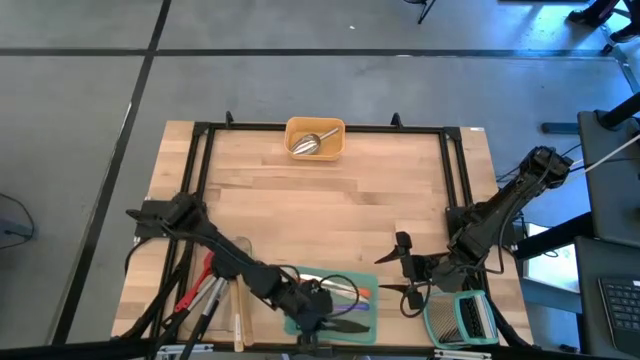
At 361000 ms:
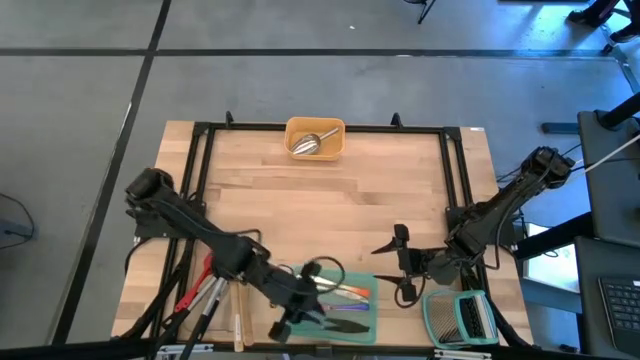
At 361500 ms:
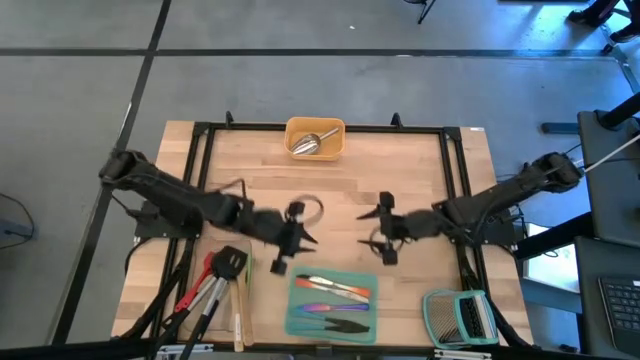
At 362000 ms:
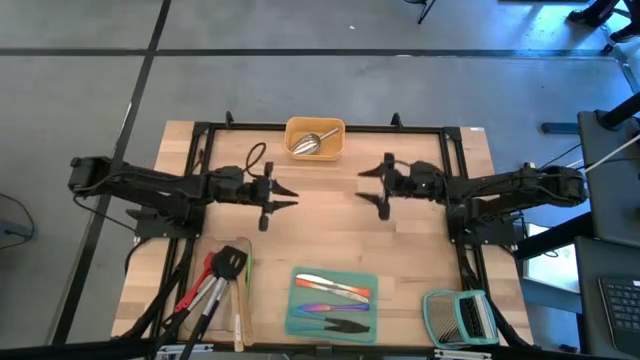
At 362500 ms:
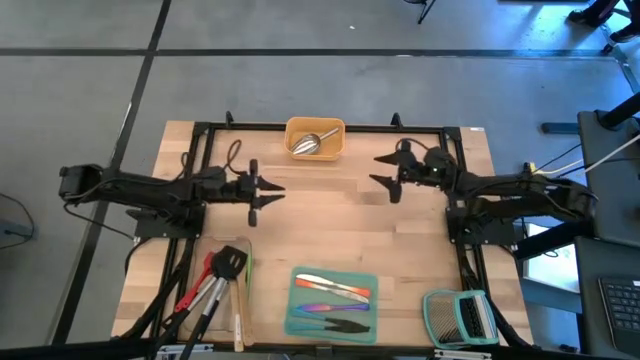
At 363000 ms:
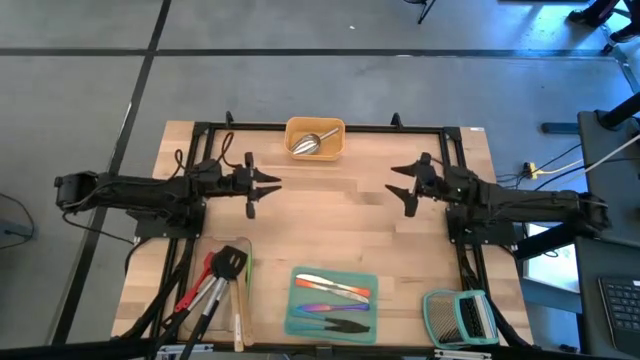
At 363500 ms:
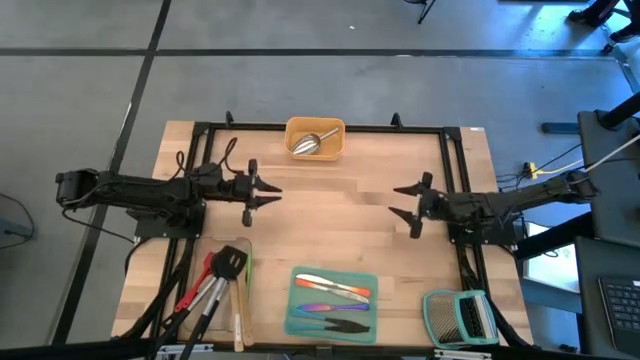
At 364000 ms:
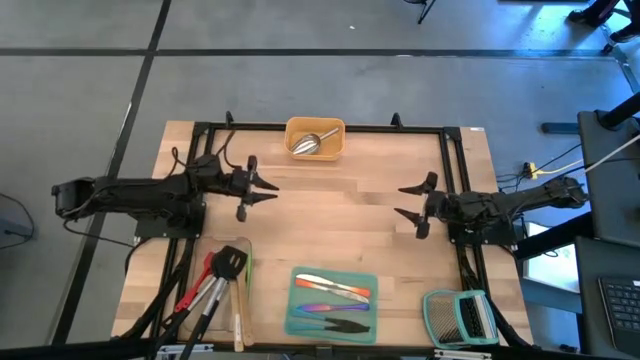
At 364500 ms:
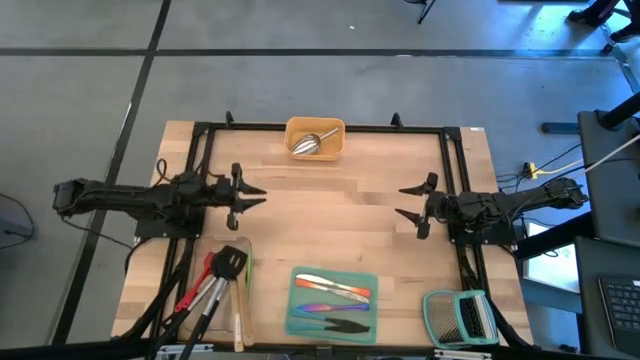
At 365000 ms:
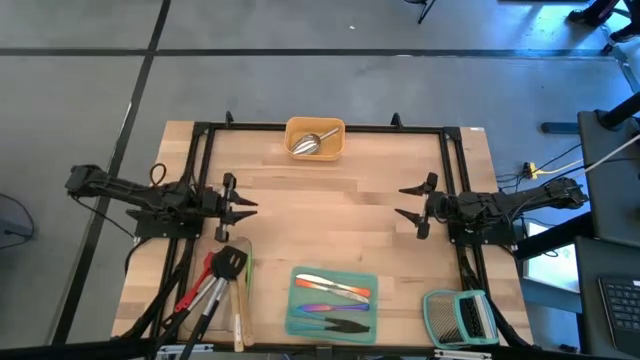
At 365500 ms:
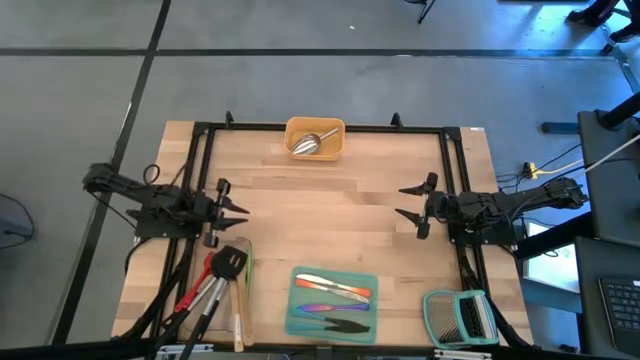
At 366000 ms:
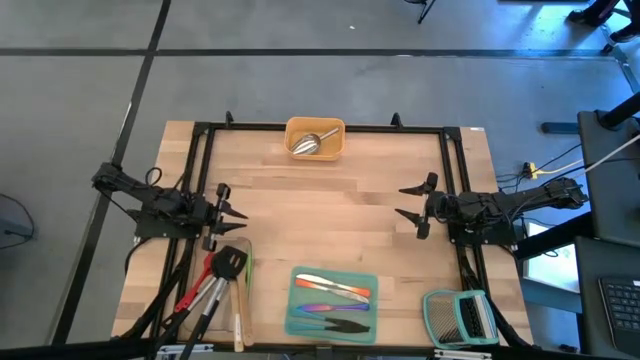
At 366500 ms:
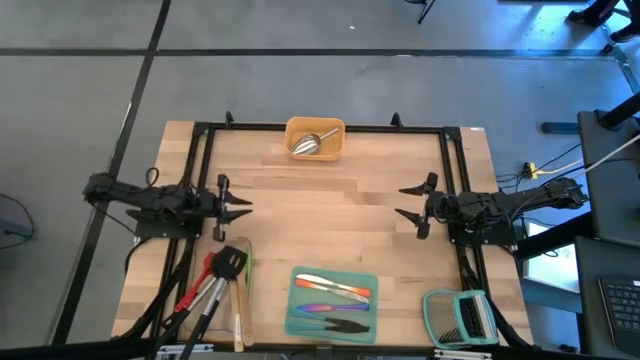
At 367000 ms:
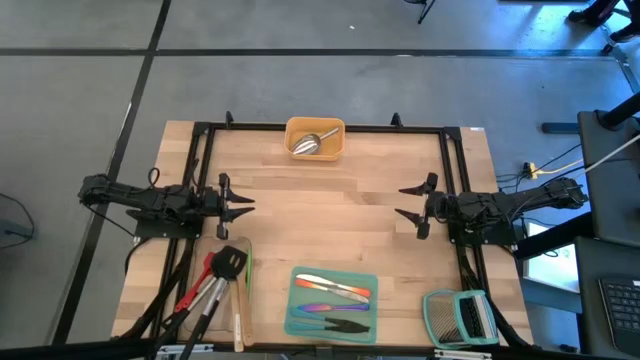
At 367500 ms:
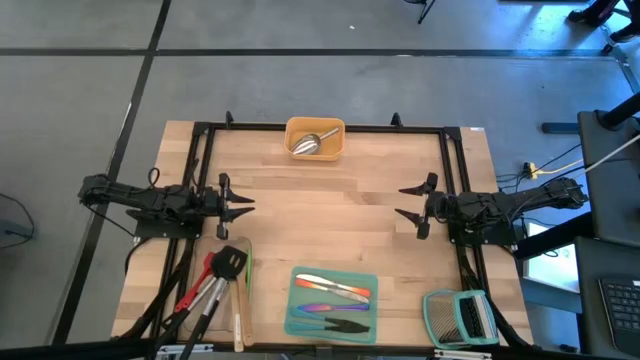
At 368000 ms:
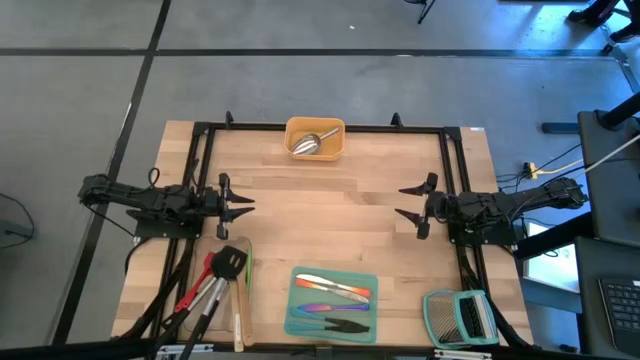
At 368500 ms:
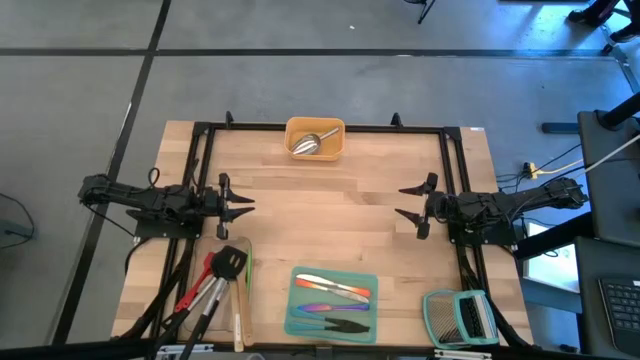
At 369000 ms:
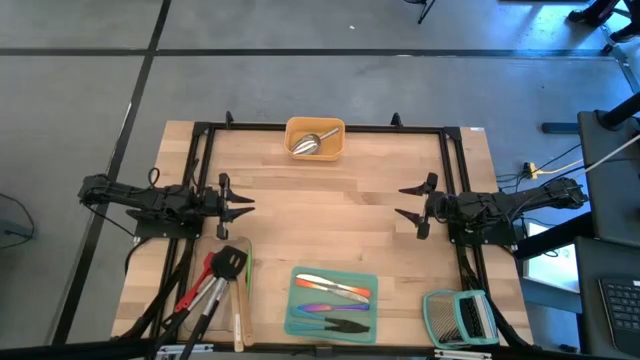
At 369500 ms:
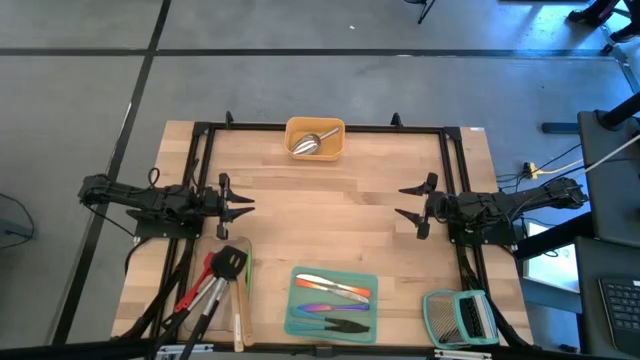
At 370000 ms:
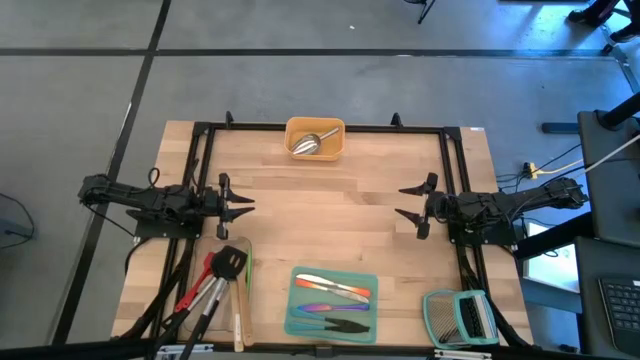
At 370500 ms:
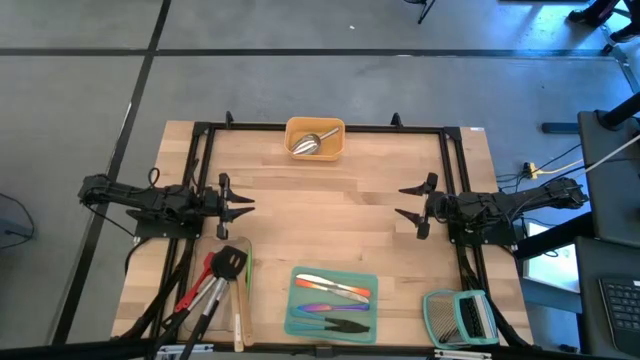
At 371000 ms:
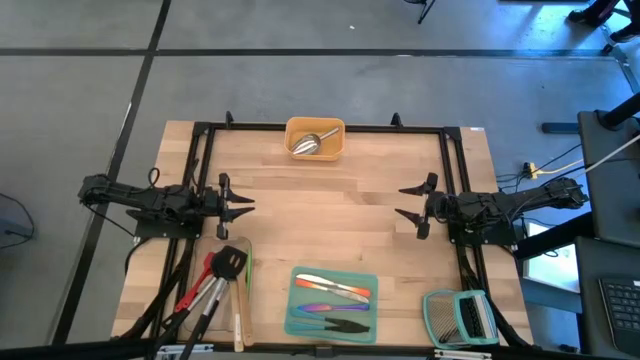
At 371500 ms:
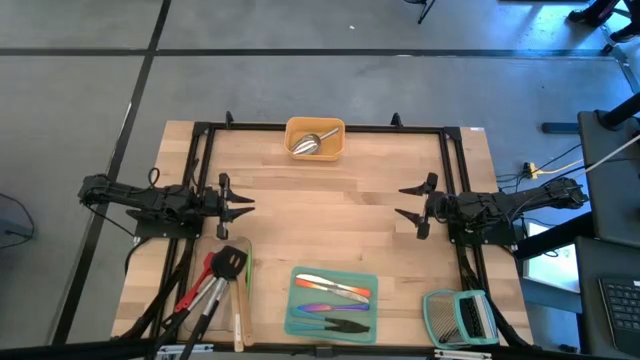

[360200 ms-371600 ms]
Task: Pick & Place Kitchen Items
Return to Home Position

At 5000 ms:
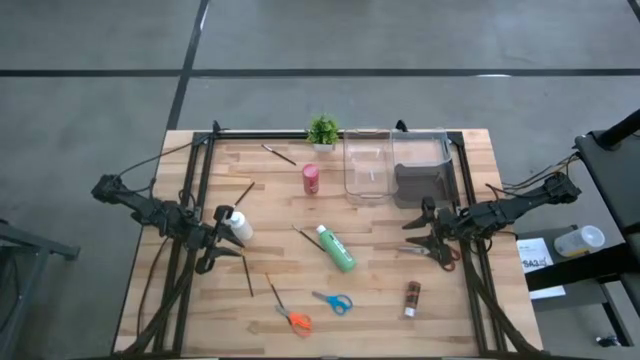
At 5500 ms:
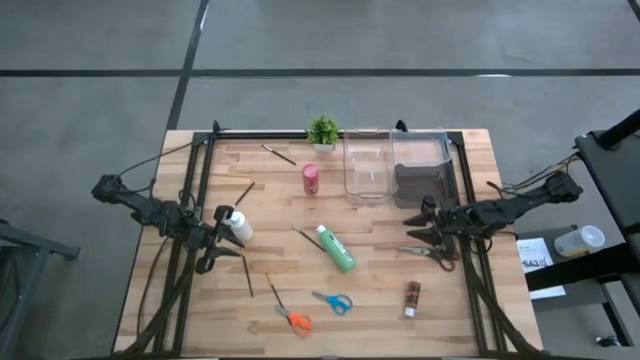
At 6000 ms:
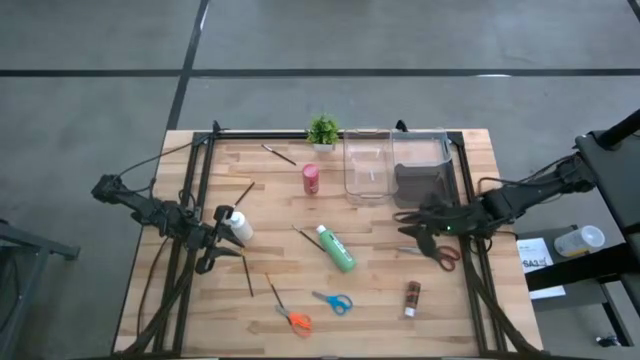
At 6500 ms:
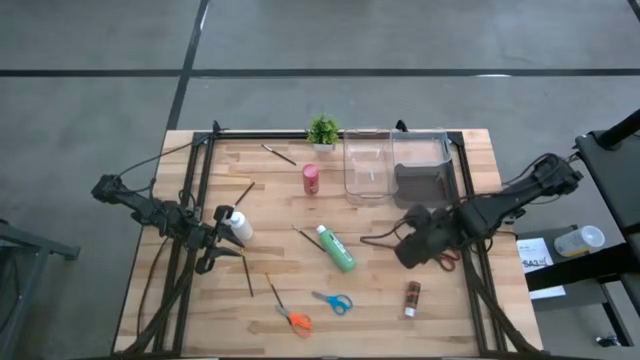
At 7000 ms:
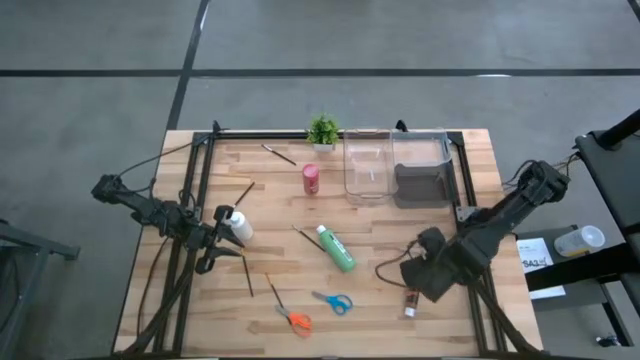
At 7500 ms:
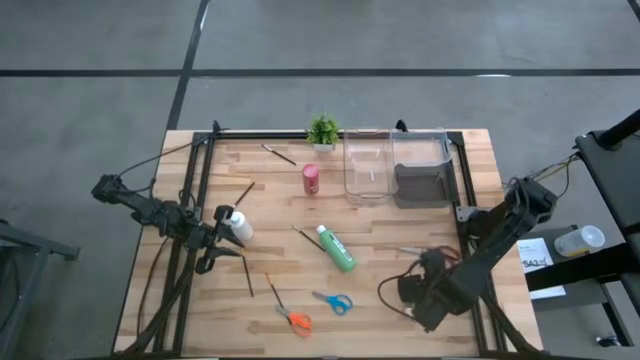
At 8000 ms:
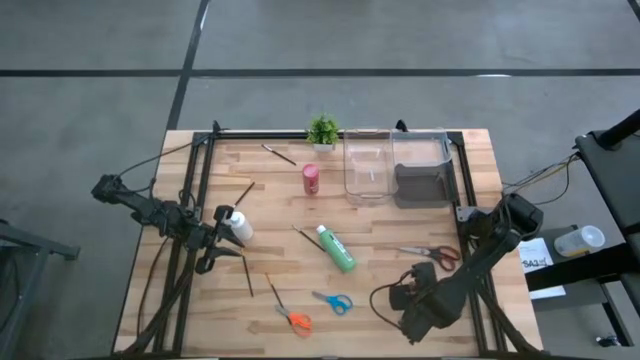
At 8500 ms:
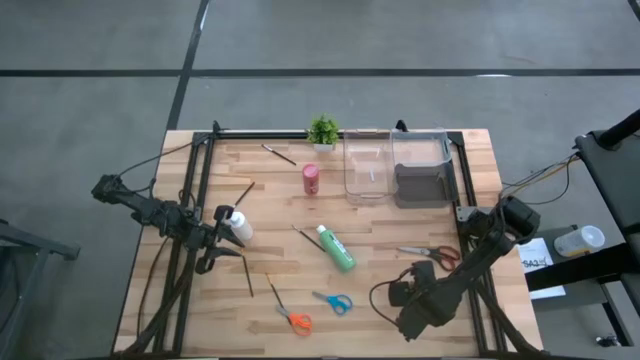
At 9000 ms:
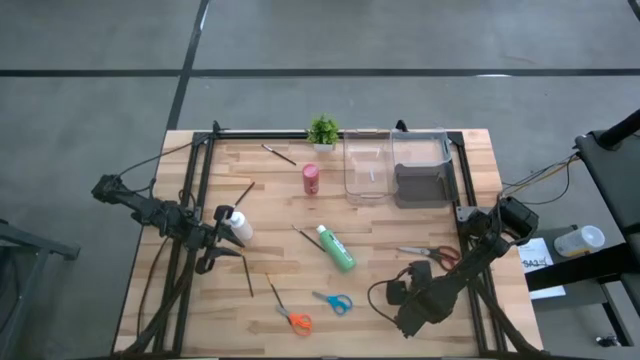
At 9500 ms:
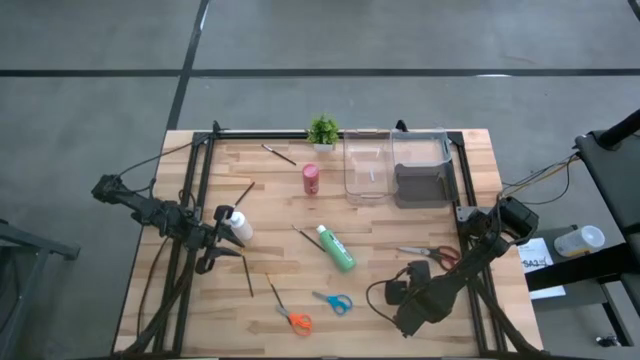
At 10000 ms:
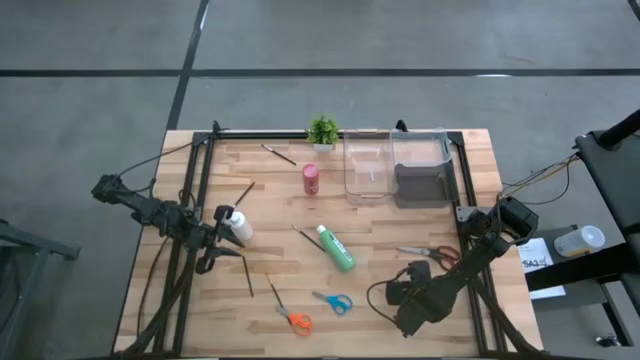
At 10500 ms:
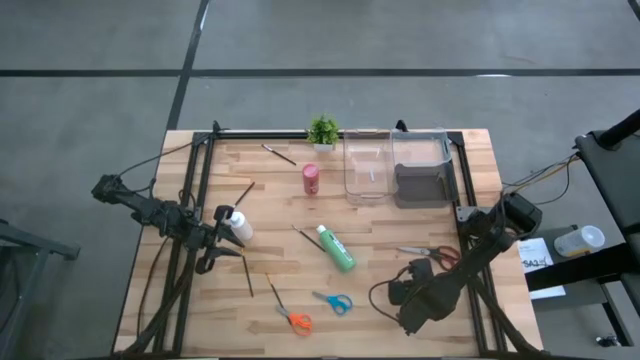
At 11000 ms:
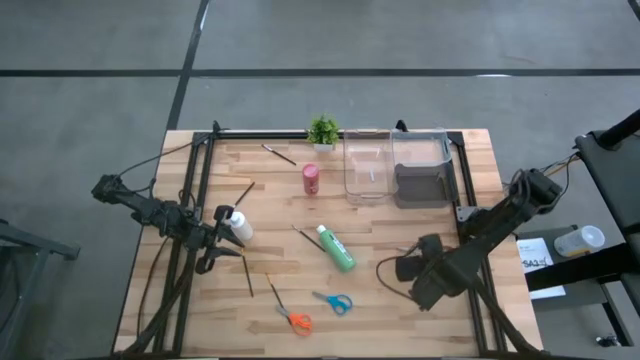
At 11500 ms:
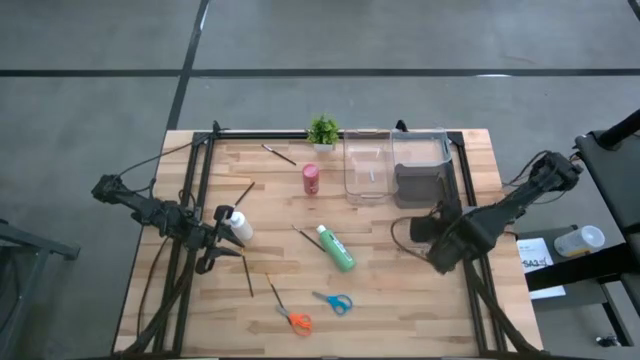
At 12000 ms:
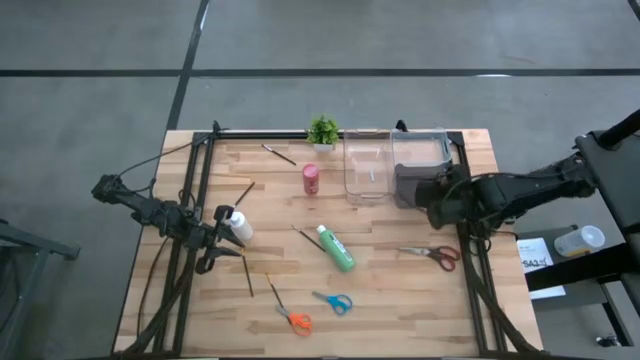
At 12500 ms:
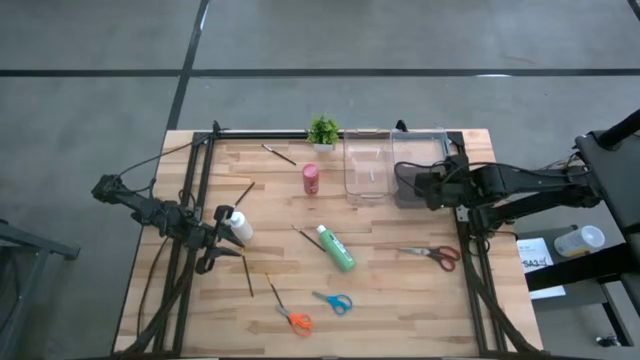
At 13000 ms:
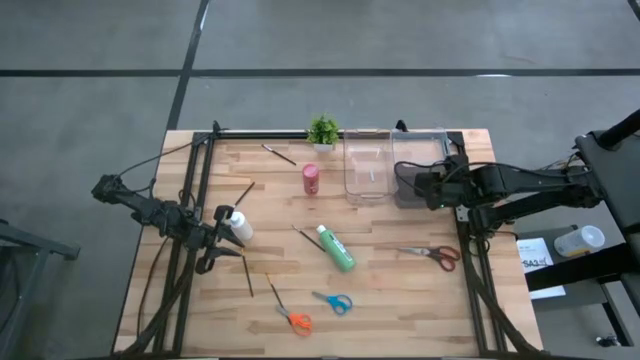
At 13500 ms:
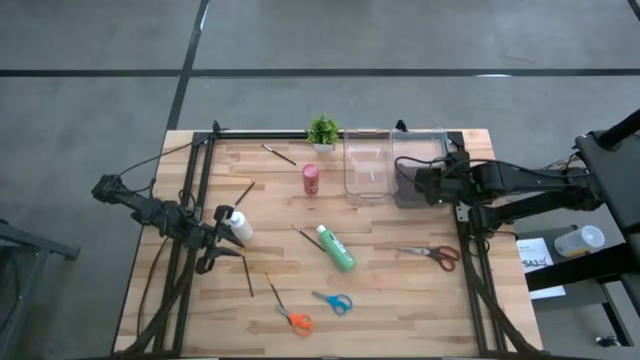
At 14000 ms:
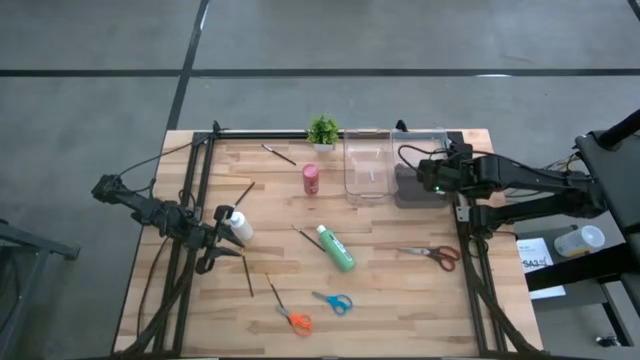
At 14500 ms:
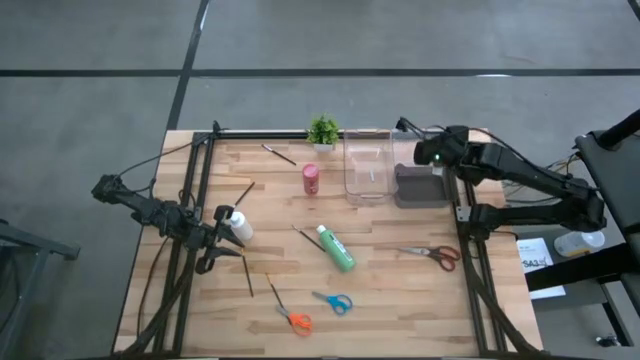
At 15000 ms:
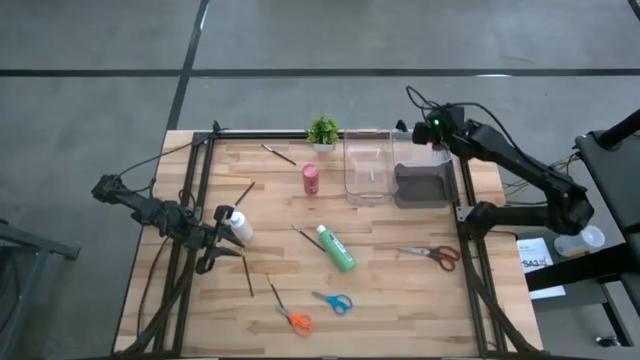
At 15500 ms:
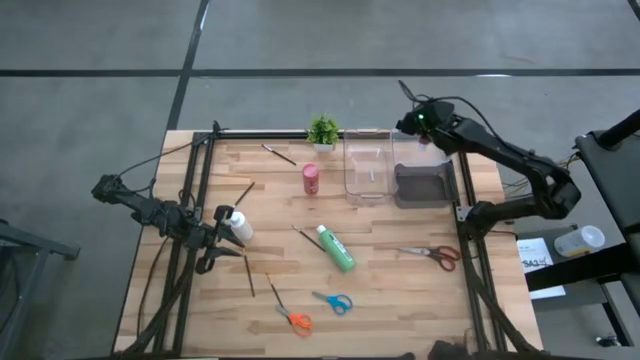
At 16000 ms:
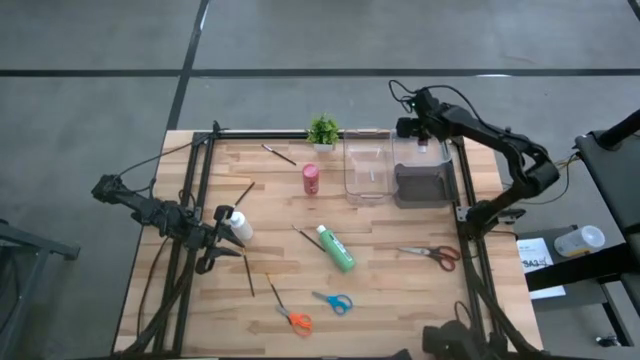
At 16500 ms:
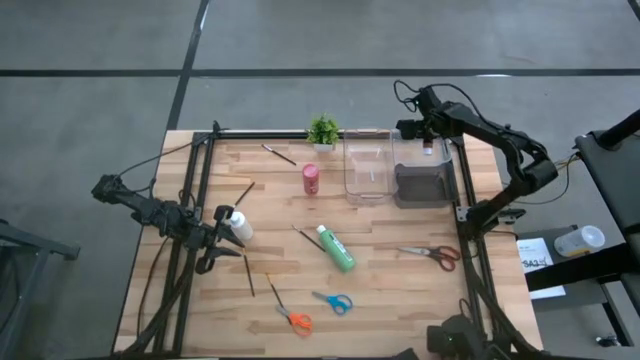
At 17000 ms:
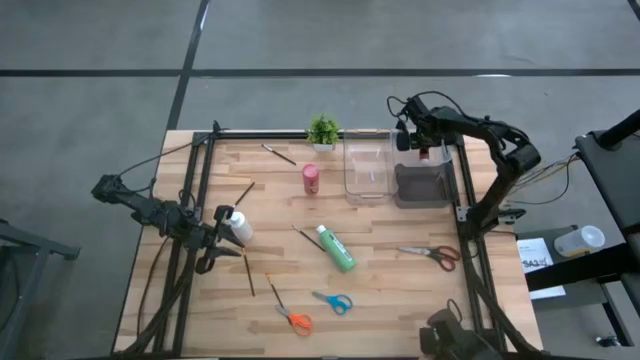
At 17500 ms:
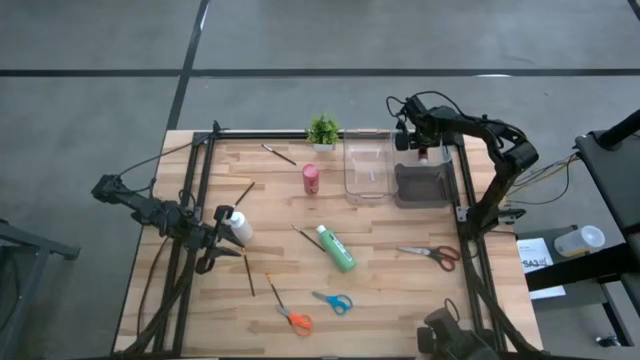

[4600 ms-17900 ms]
Task: Pick & Place Paint Supplies
Put the orange paint bottle into the right transparent bin
